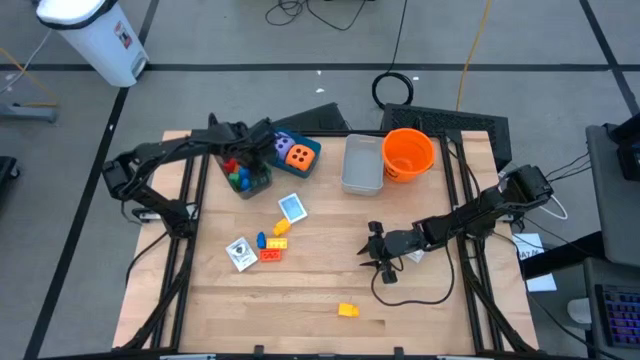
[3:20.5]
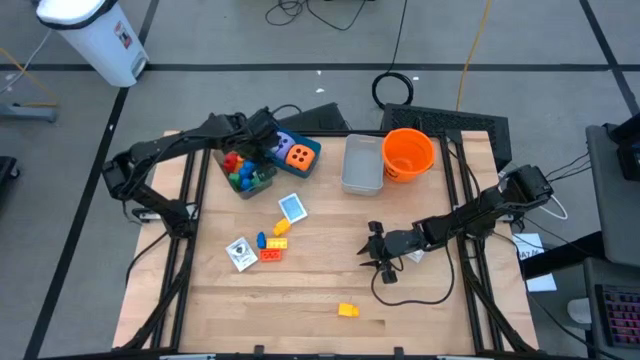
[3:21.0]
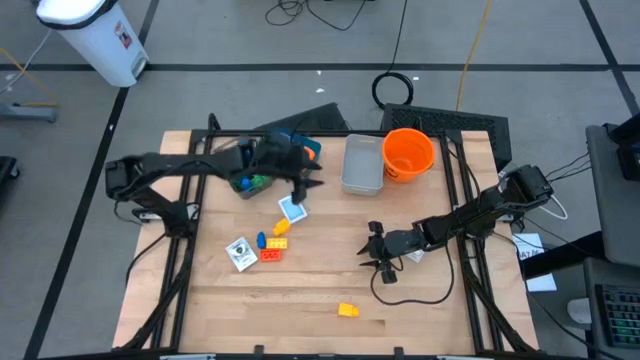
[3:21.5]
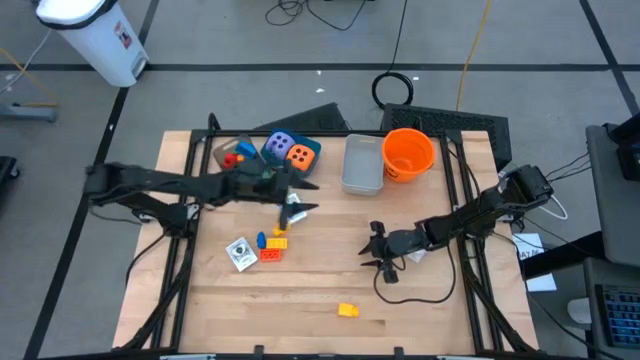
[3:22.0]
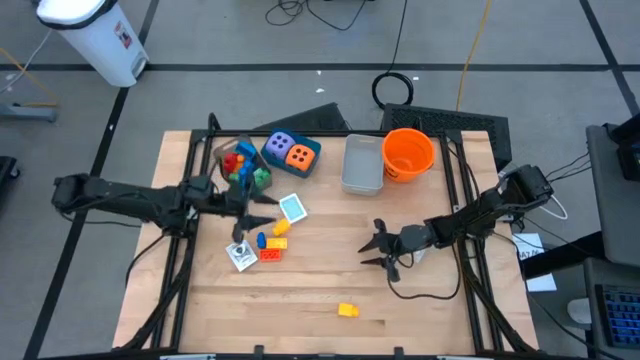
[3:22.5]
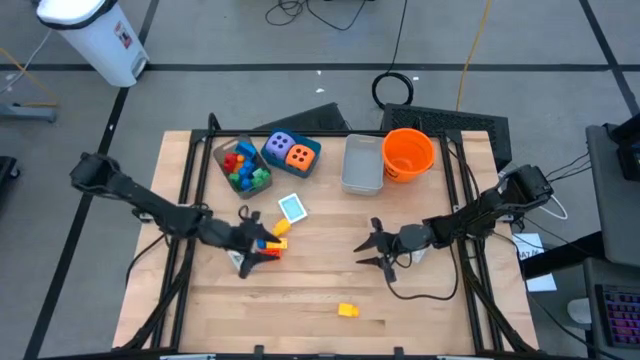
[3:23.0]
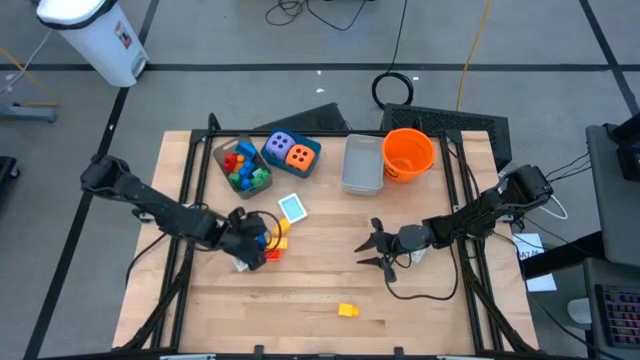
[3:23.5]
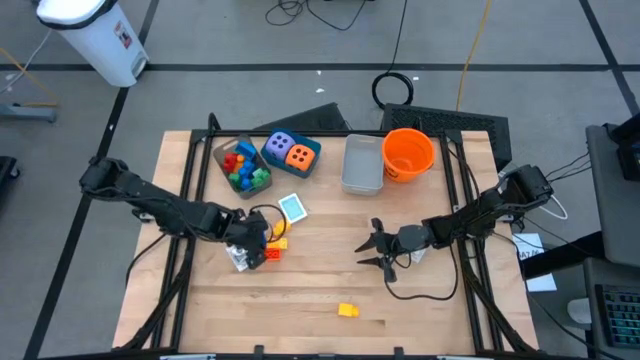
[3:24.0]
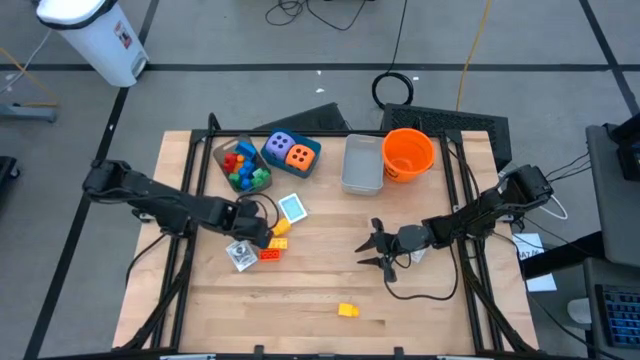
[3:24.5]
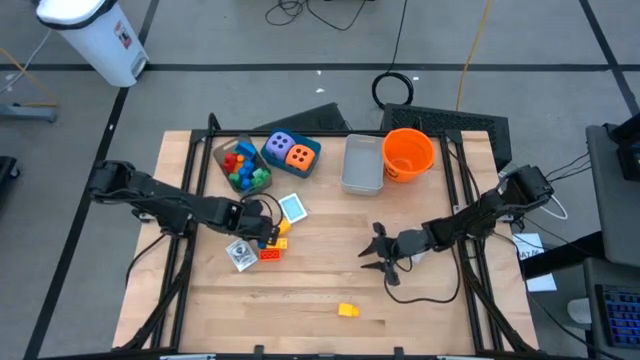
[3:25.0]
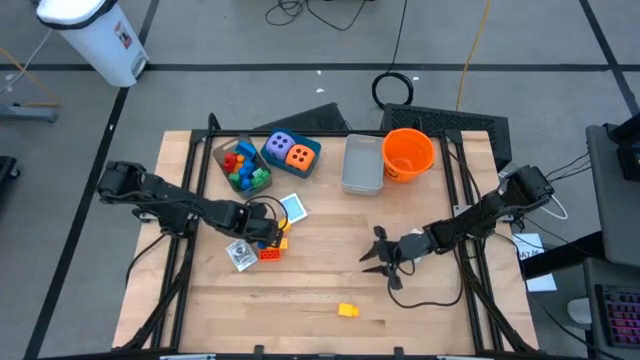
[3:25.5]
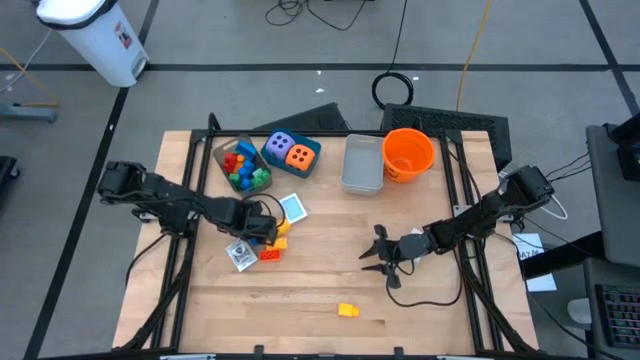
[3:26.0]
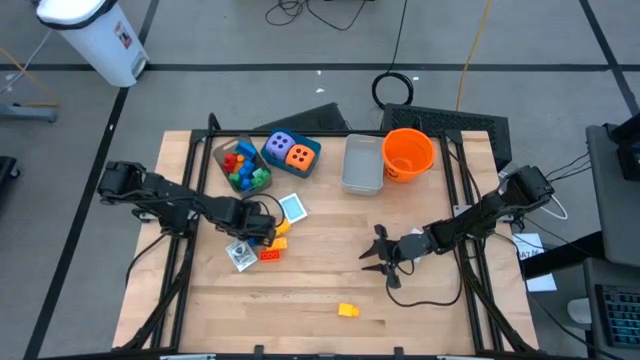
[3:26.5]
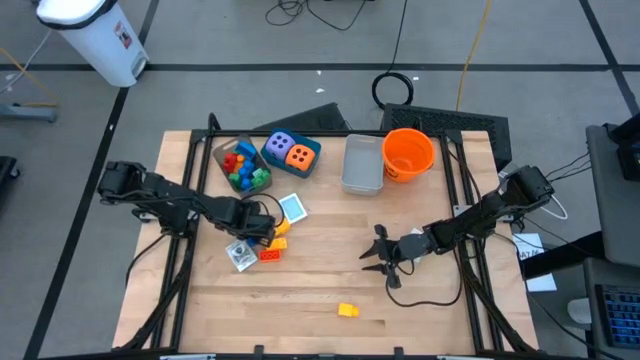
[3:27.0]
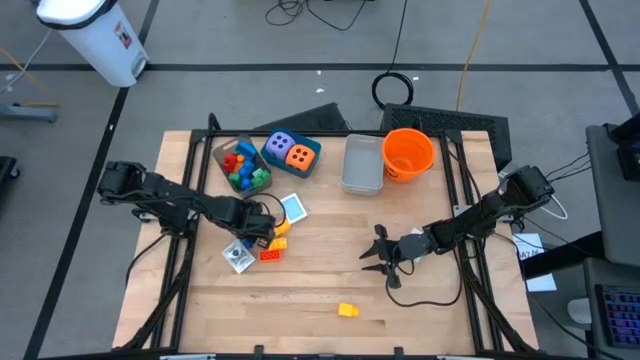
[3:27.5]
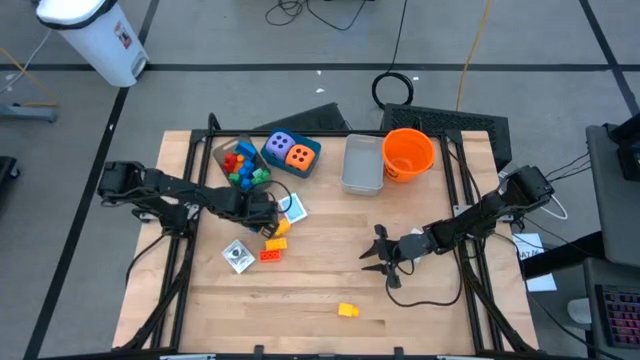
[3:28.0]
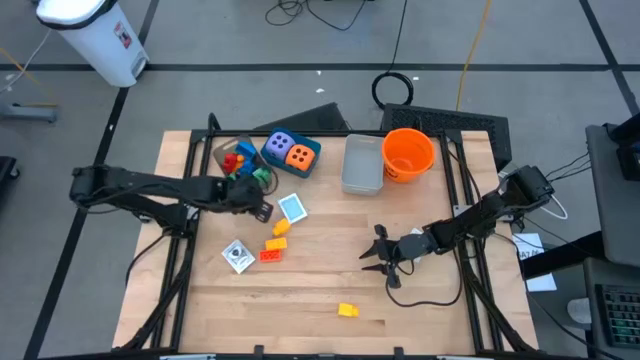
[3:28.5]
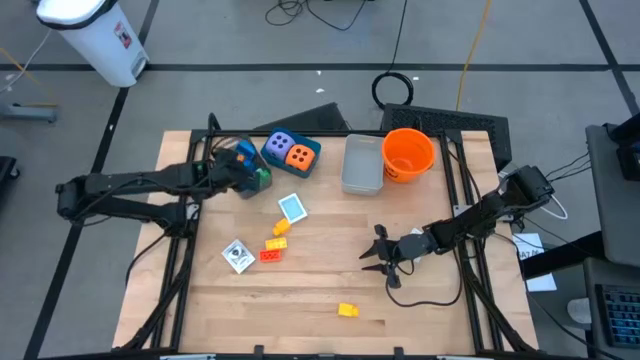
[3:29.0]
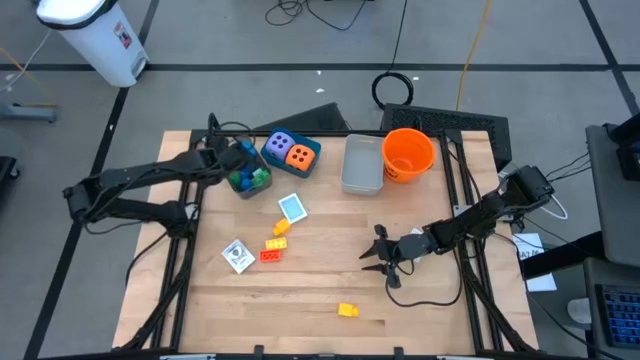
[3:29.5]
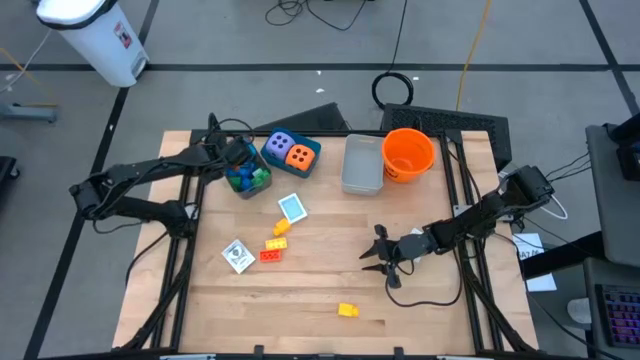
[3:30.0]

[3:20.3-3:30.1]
Task: Pick & Place Toys
Put the blue game piece into the black bin

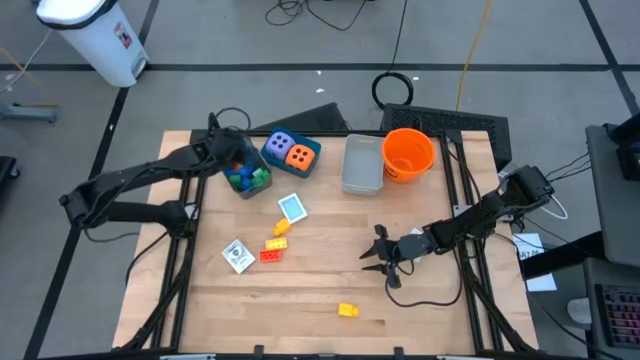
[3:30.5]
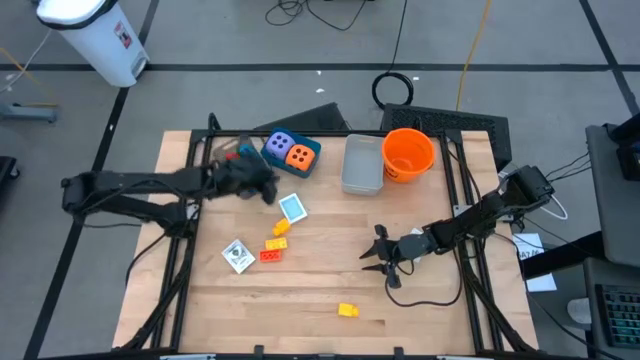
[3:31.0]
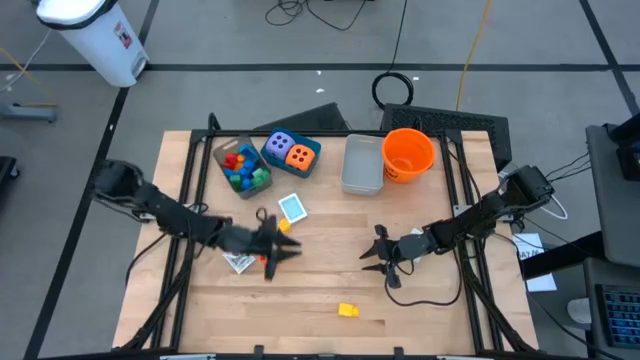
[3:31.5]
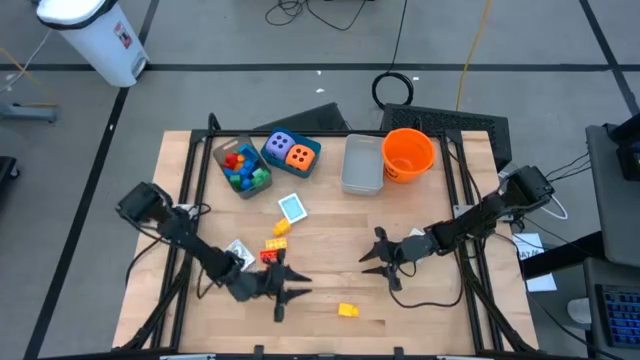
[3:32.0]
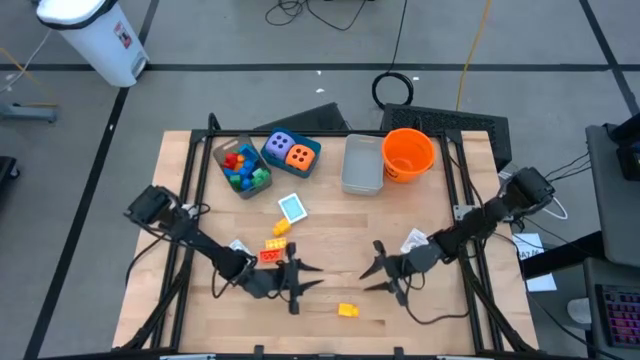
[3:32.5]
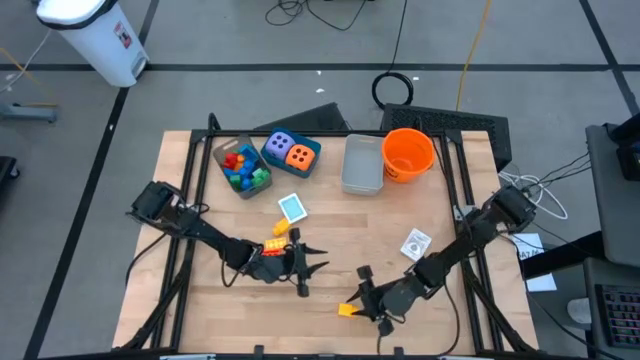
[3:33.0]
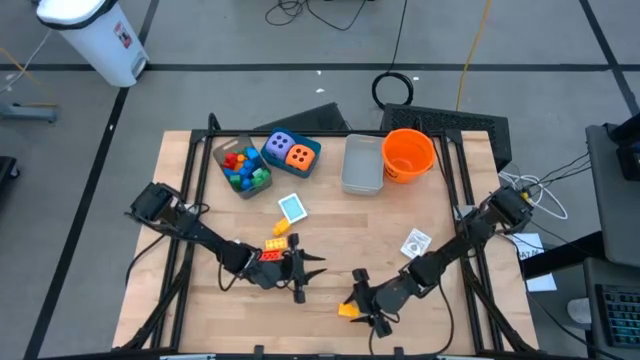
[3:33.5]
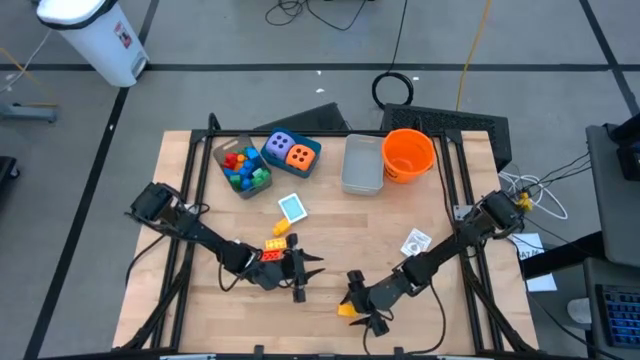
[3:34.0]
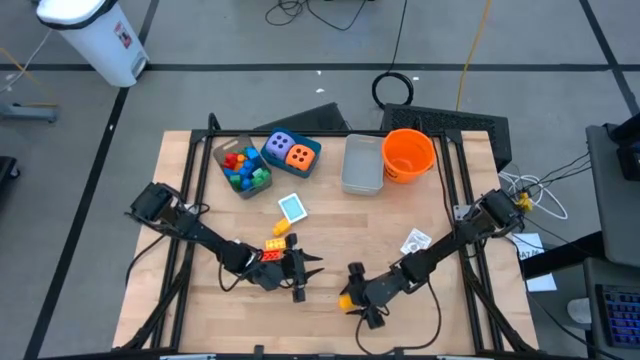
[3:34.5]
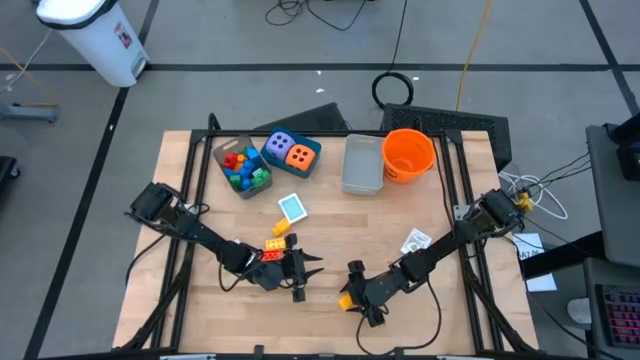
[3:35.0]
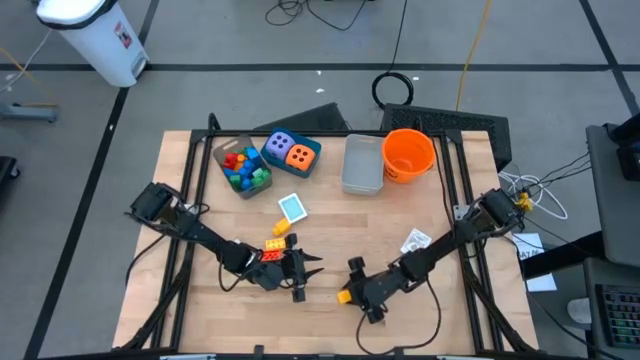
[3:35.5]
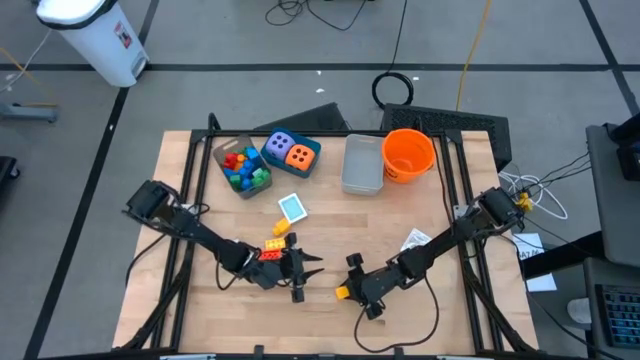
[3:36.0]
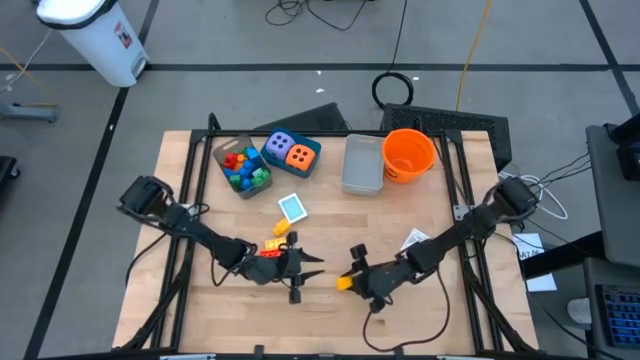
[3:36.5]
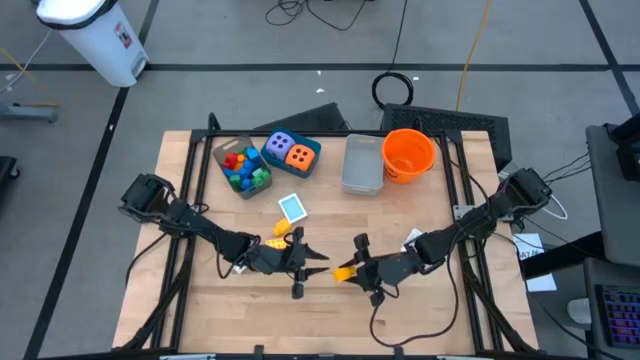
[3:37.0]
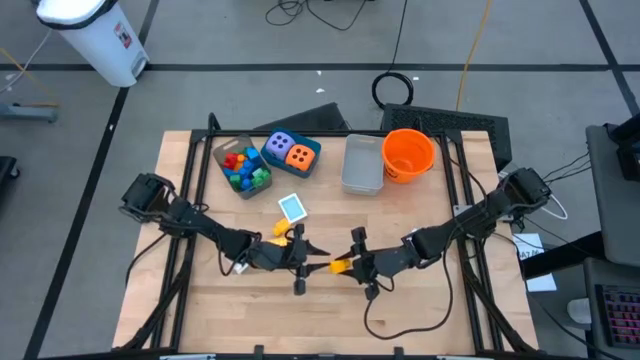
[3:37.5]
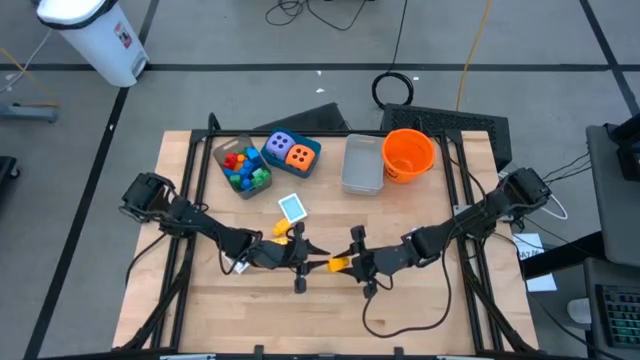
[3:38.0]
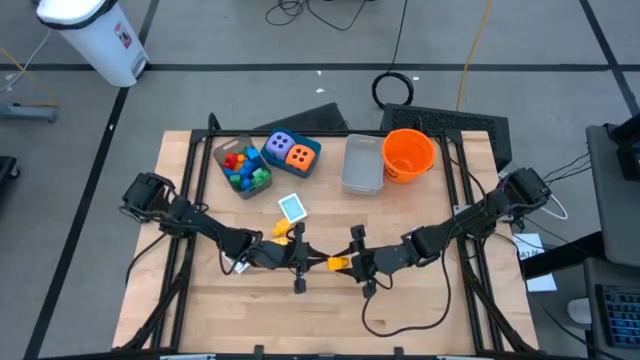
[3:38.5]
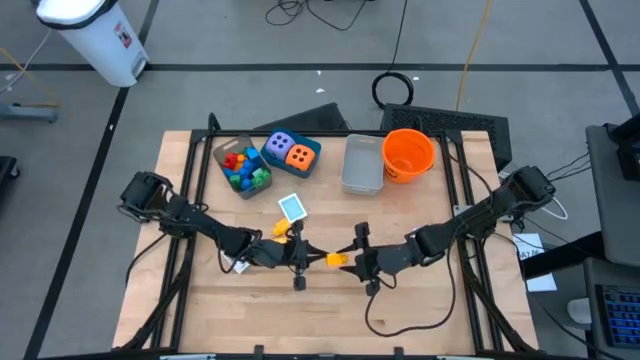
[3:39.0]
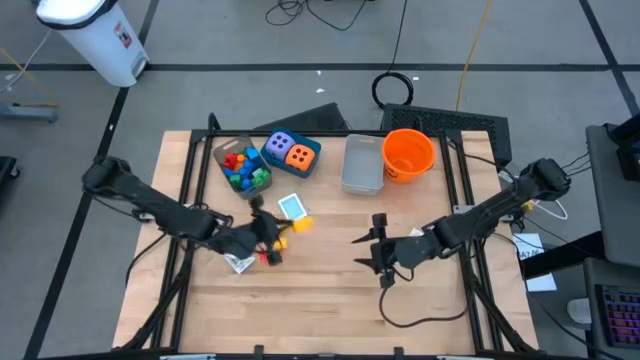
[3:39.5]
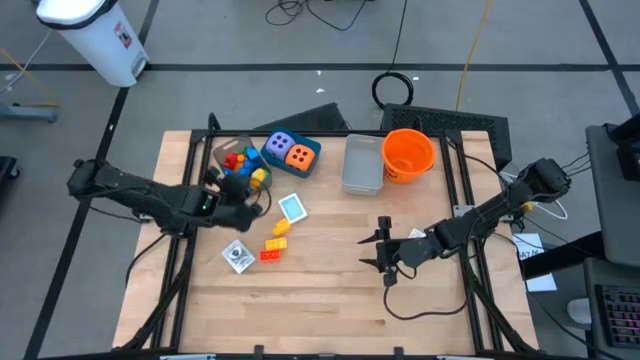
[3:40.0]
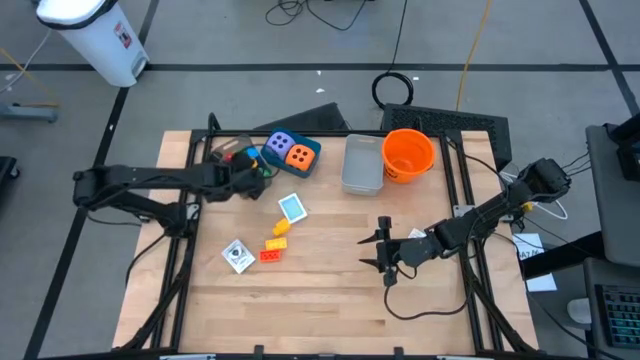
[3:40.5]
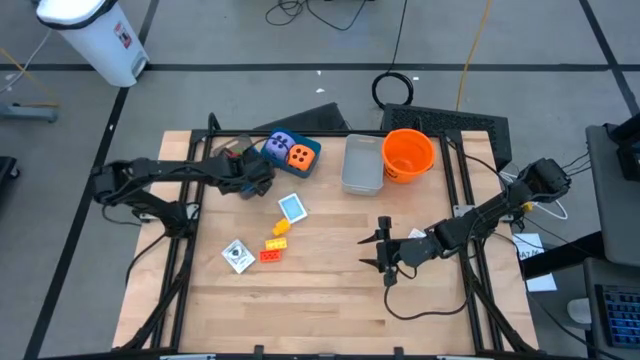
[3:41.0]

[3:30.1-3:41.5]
Put the yellow game piece into the black bin
